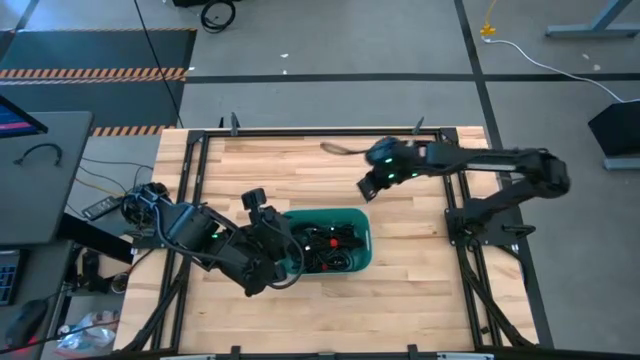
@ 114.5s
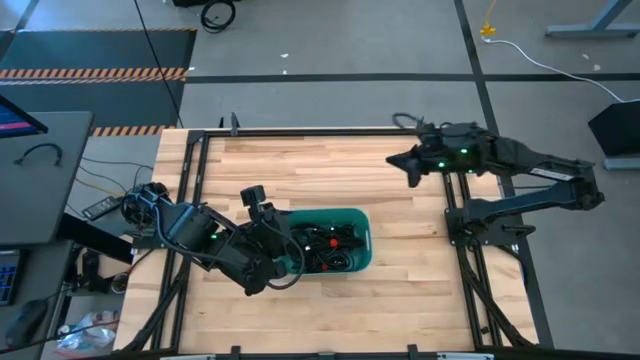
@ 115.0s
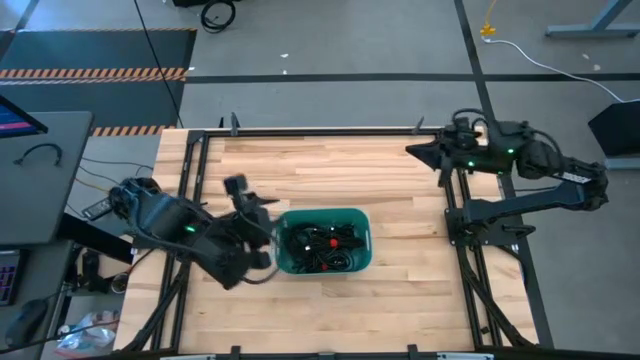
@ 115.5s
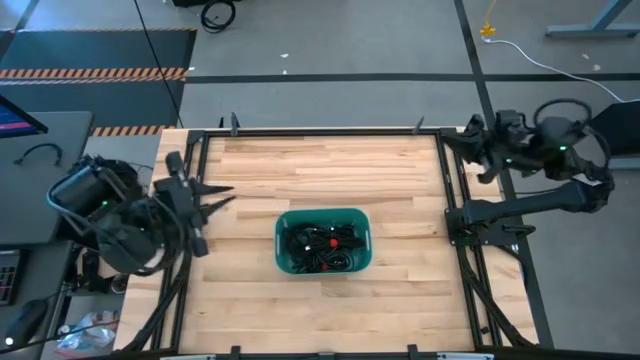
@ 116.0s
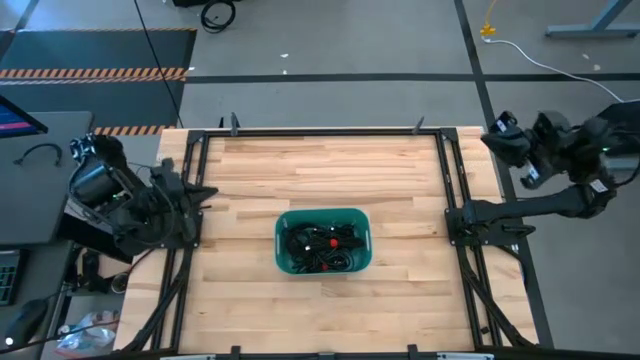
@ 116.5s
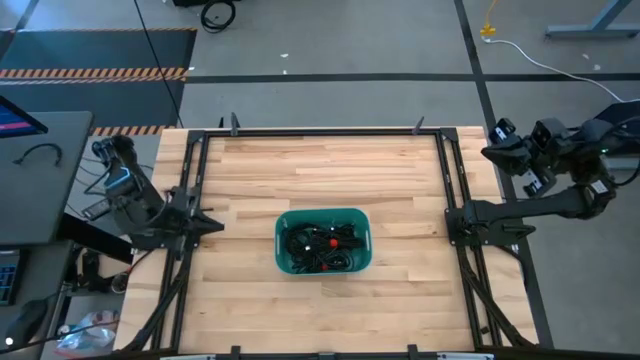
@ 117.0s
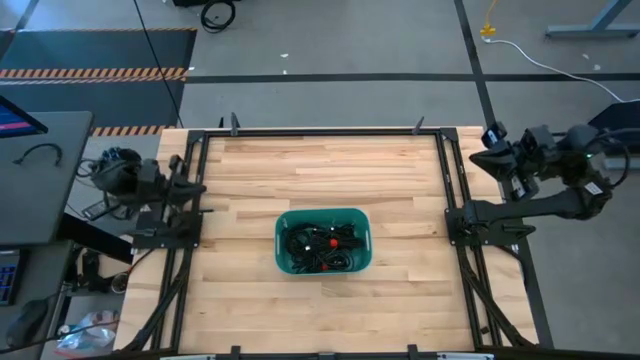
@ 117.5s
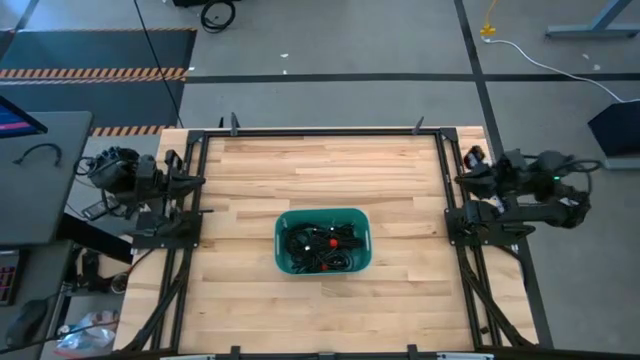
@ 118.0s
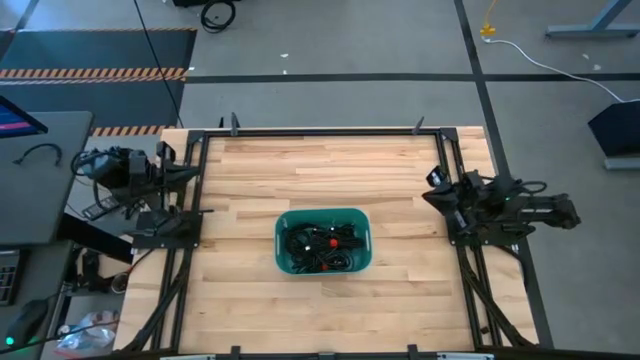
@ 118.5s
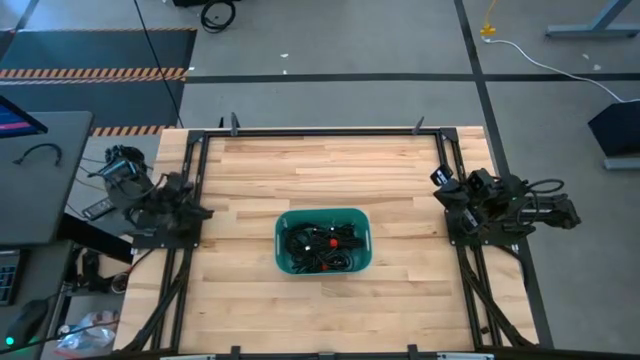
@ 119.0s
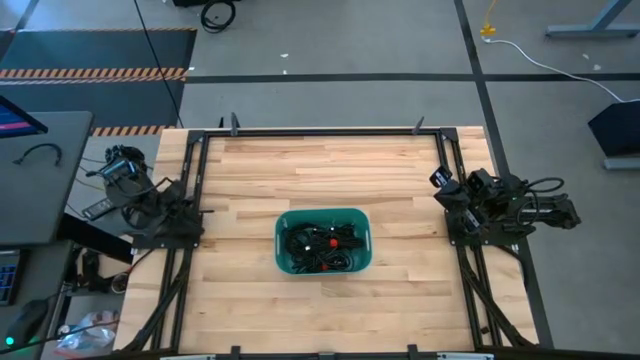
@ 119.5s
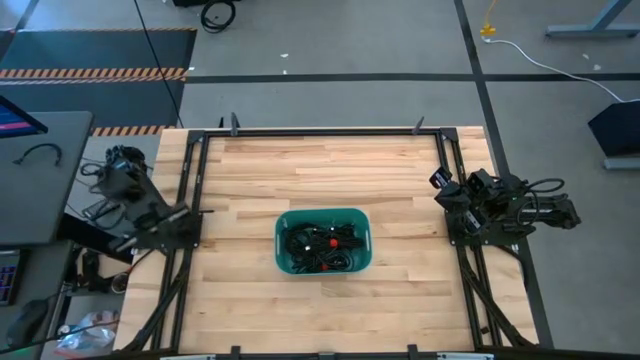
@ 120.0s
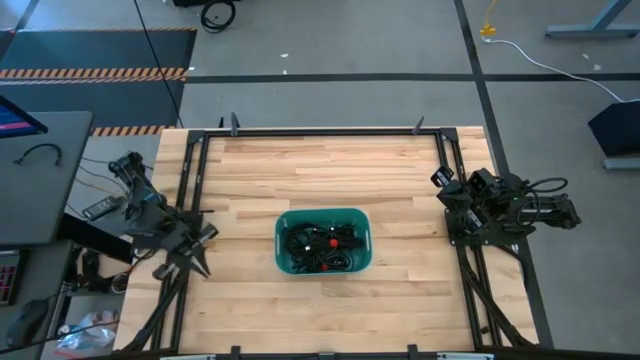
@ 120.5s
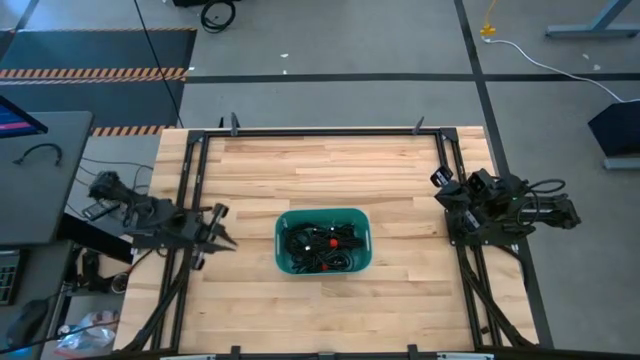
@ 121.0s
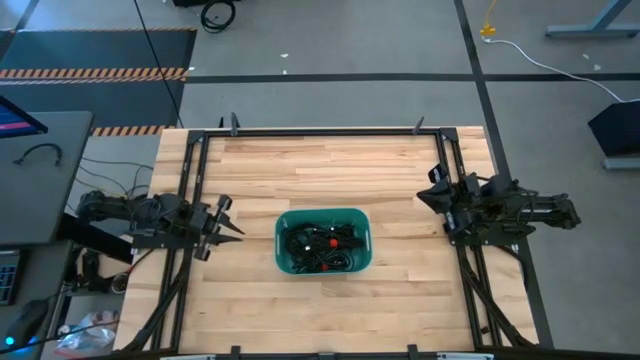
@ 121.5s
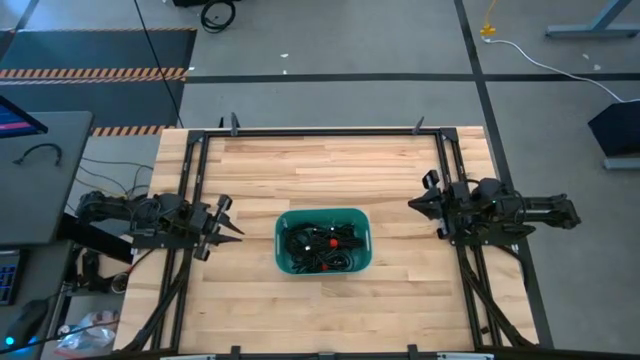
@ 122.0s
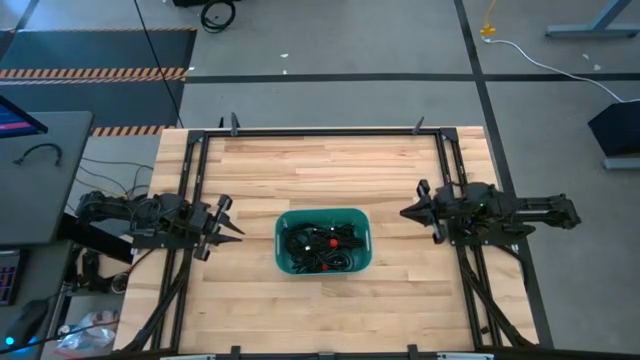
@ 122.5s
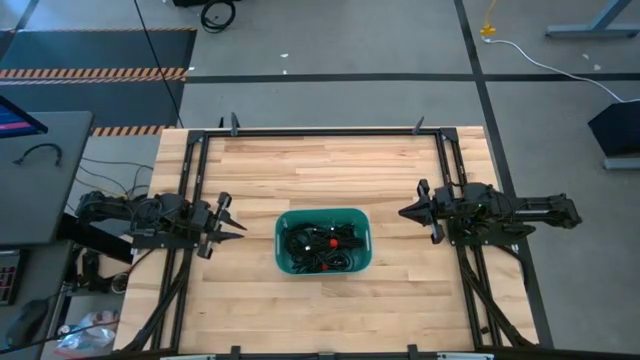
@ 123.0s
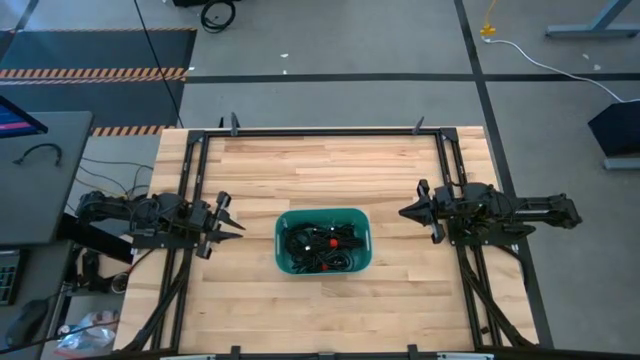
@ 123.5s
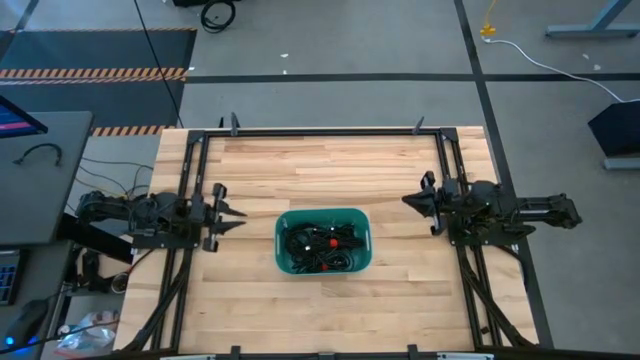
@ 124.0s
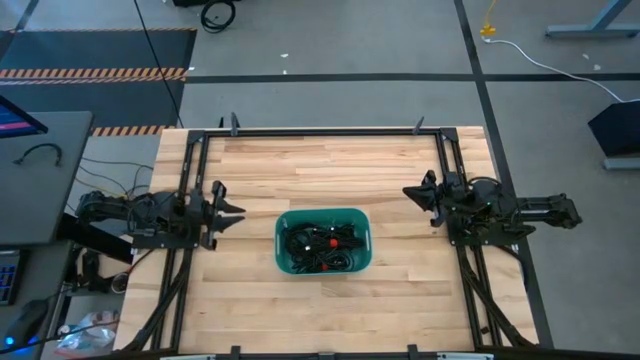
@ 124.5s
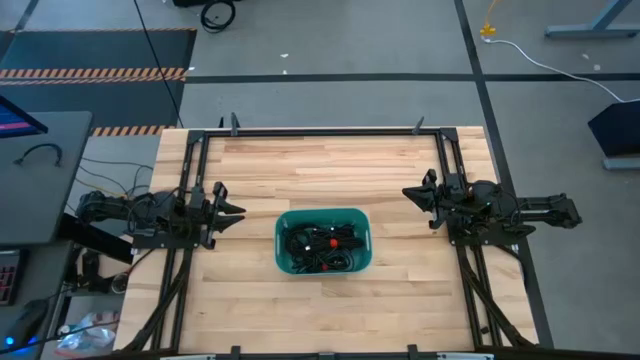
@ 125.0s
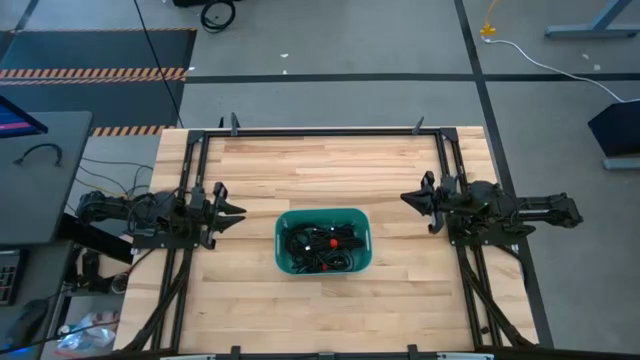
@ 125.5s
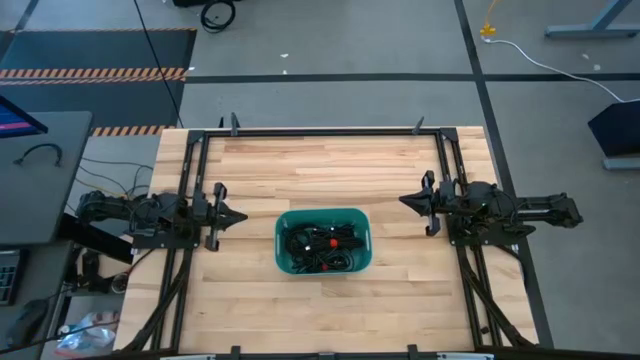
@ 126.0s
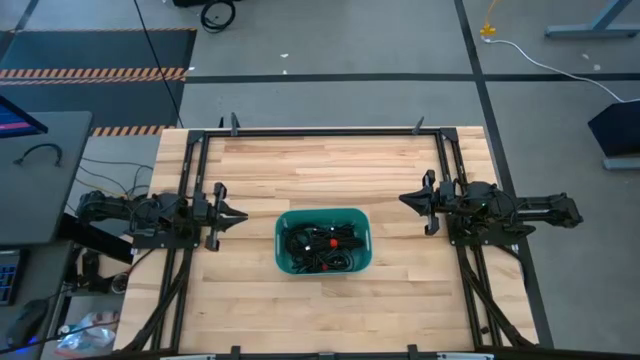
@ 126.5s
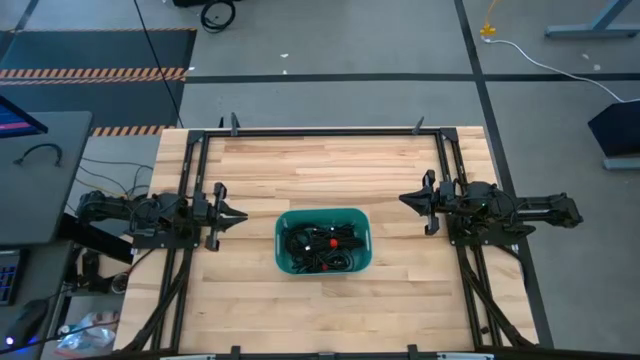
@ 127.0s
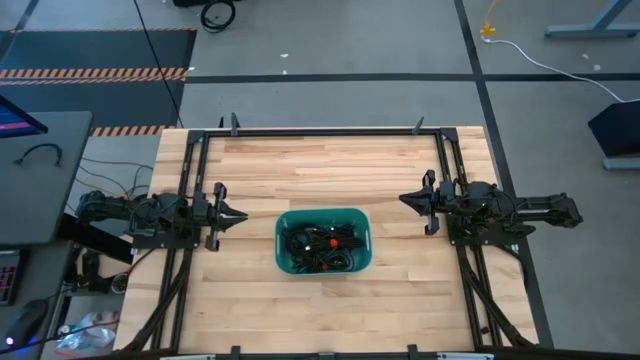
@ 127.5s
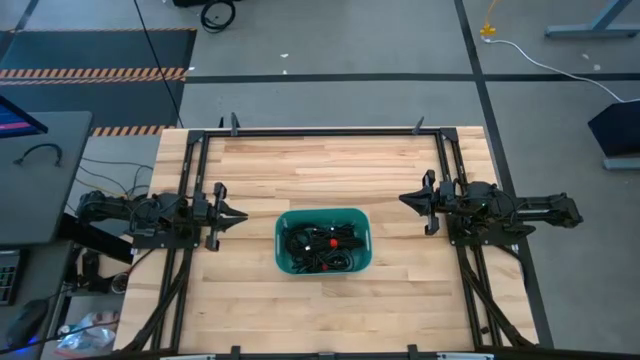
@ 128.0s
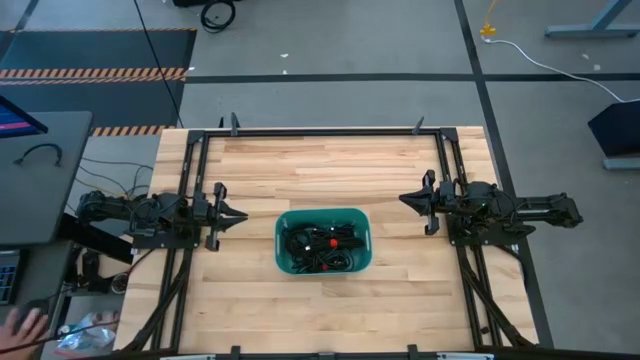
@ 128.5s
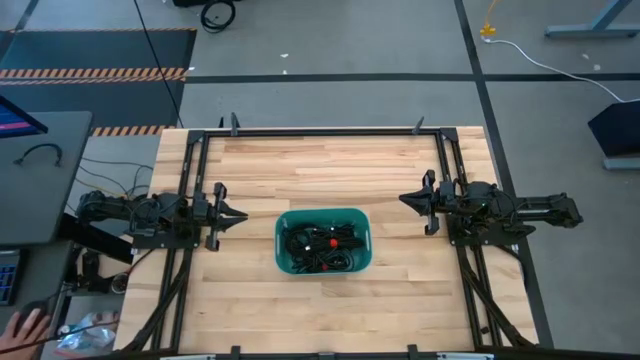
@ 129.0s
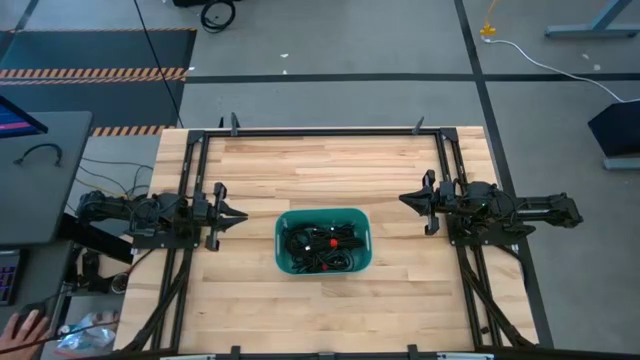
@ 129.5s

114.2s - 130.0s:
Task: Pick and place USB-C Cables
Return to Home Position

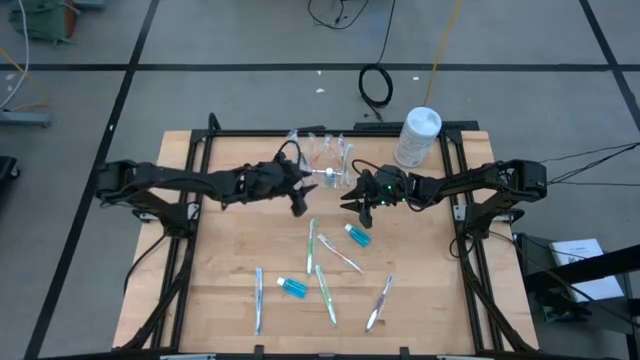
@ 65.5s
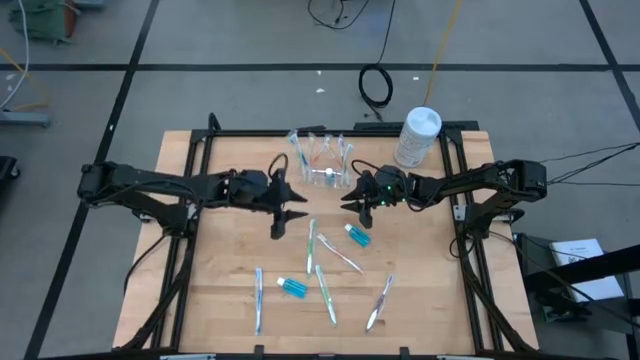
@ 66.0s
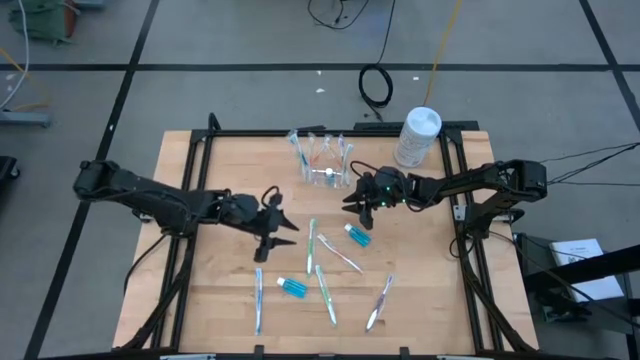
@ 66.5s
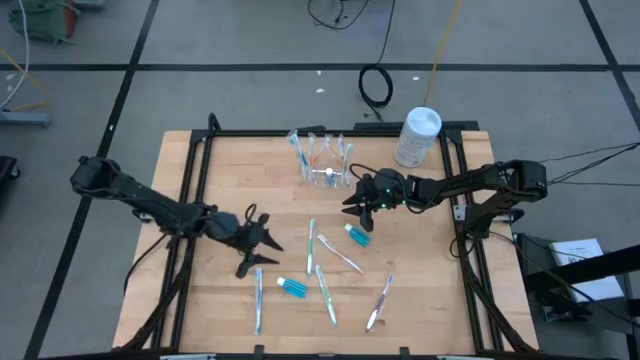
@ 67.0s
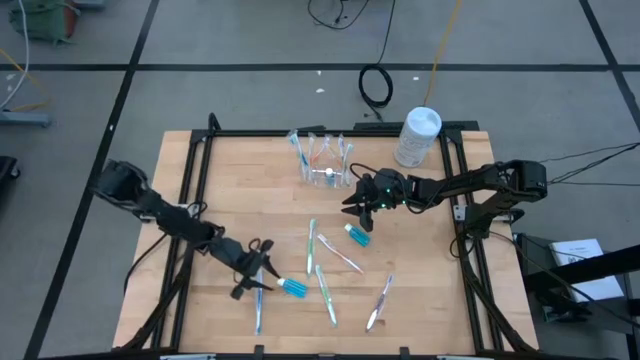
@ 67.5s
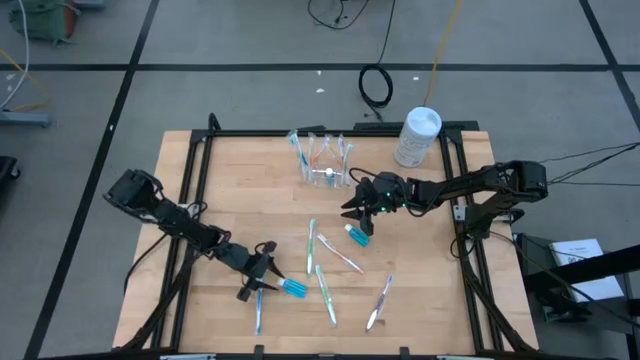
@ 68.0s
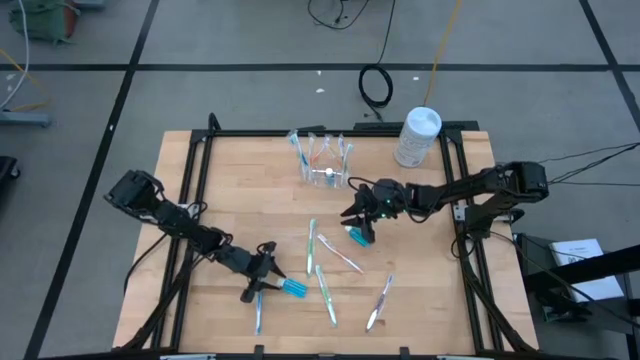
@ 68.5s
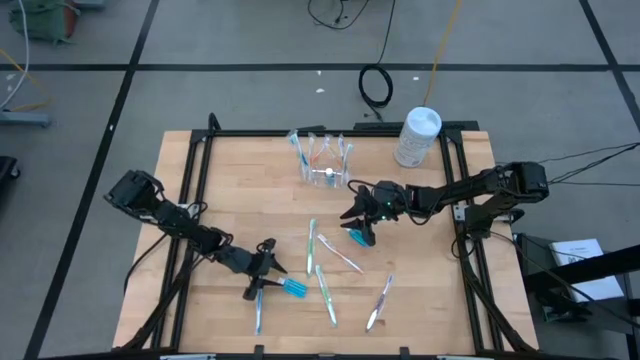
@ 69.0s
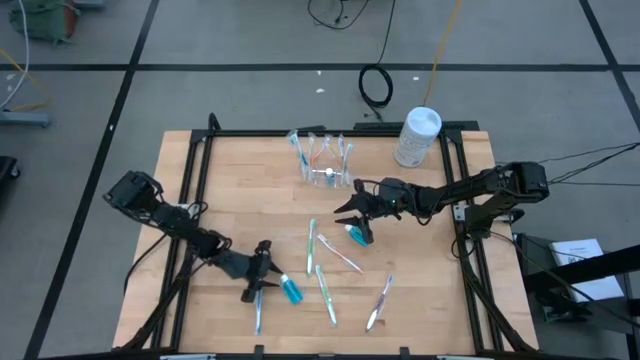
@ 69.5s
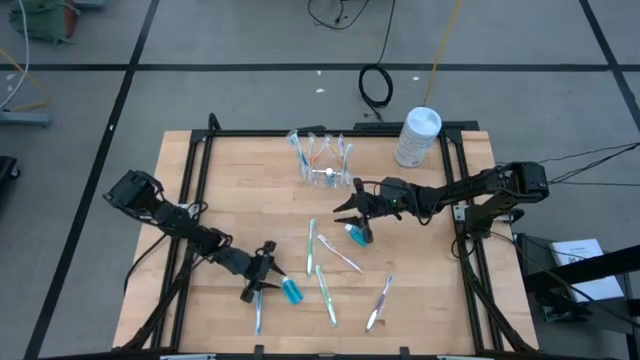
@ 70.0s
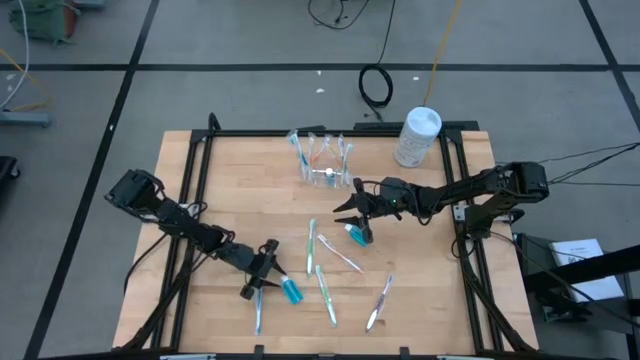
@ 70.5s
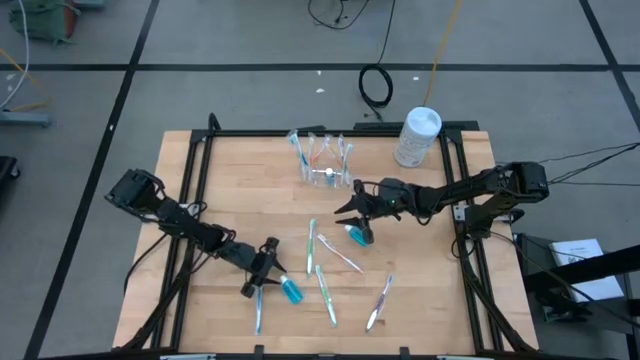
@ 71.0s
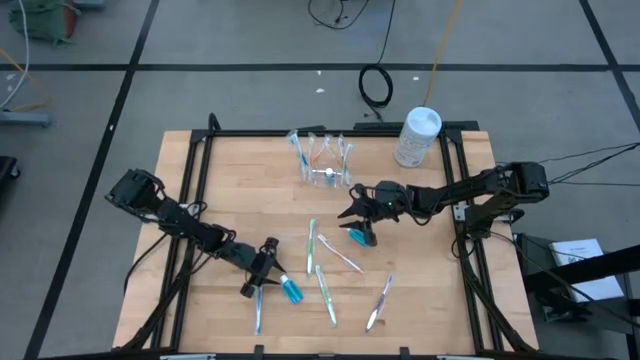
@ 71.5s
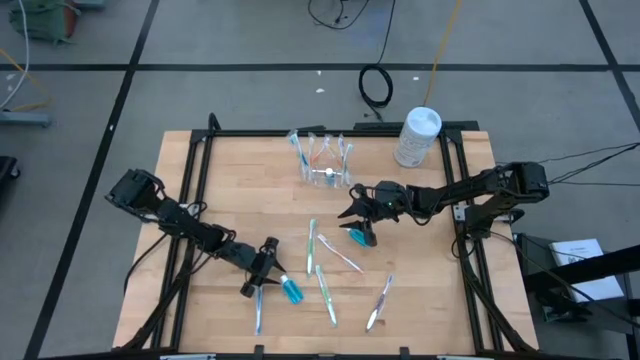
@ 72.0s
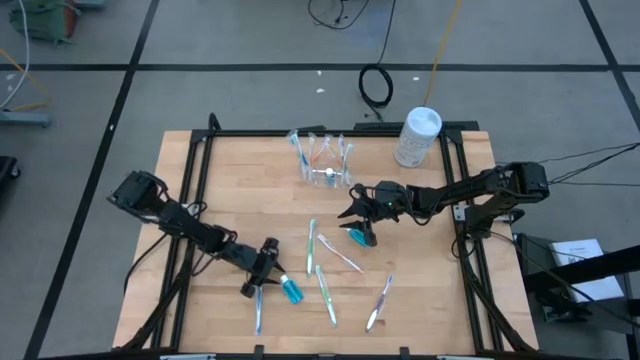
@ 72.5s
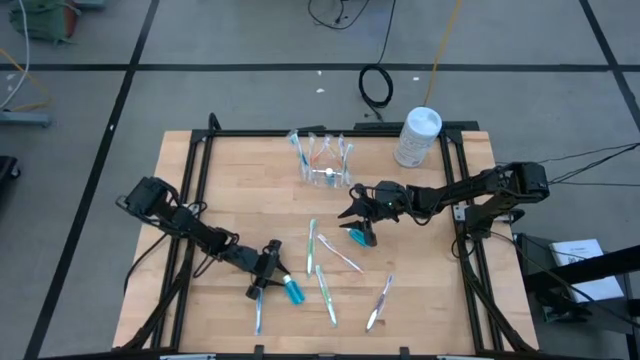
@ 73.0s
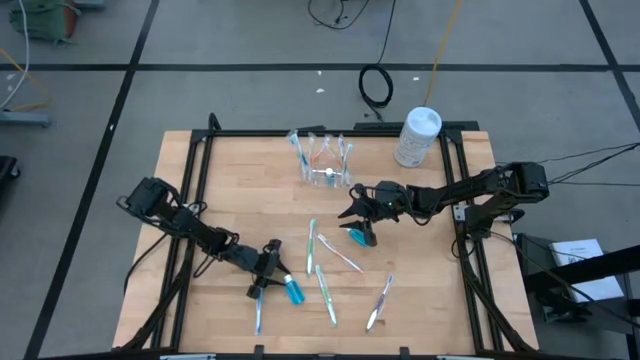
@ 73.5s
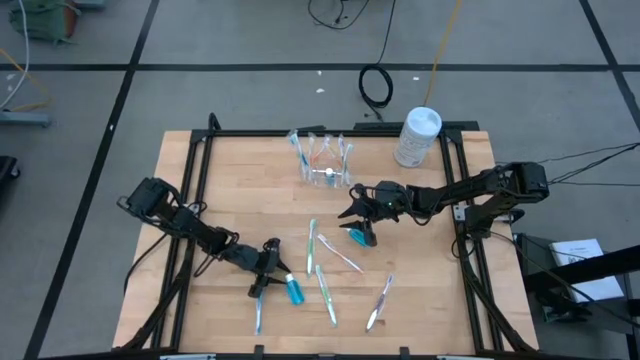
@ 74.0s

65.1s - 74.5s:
Task: Pick & Place toothbrushing station
Put the blue mouthwash into the transparent organizer
